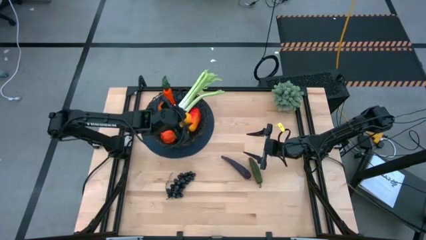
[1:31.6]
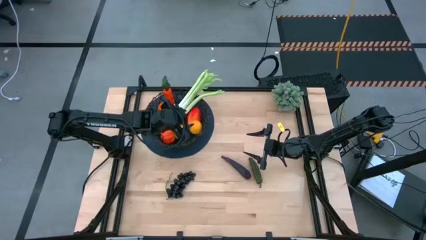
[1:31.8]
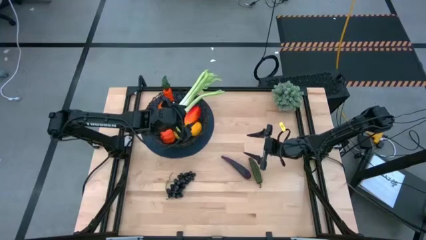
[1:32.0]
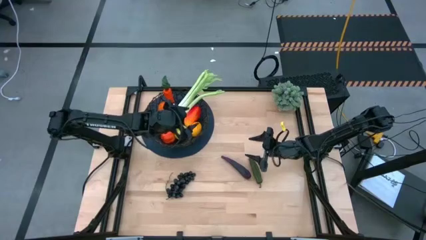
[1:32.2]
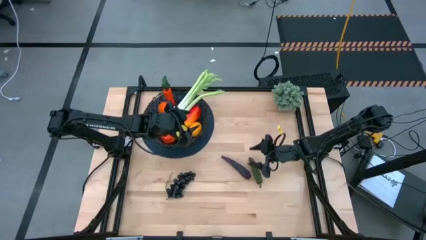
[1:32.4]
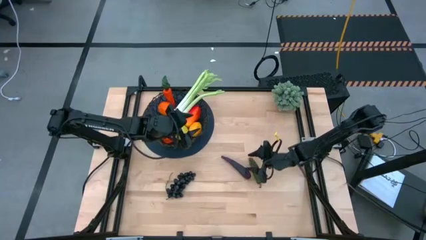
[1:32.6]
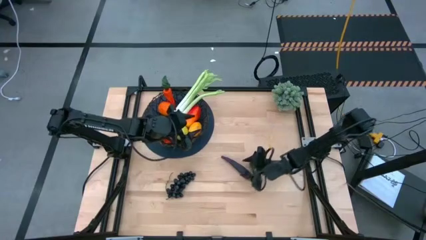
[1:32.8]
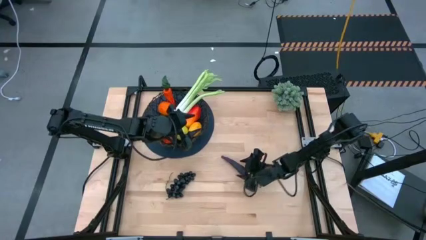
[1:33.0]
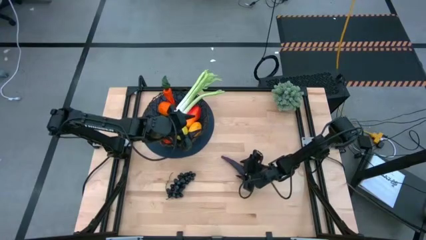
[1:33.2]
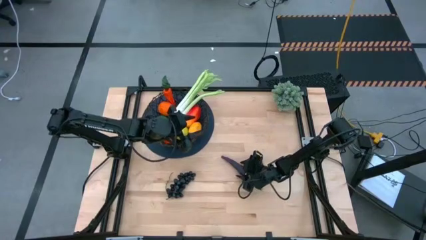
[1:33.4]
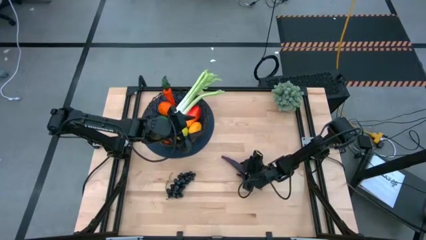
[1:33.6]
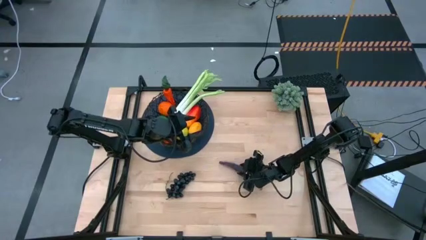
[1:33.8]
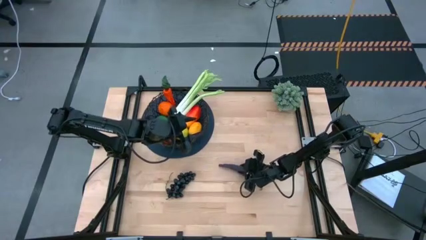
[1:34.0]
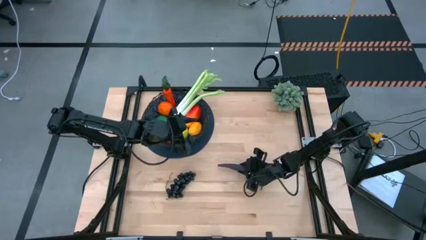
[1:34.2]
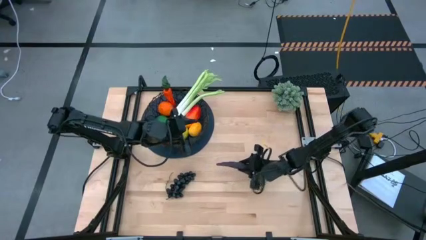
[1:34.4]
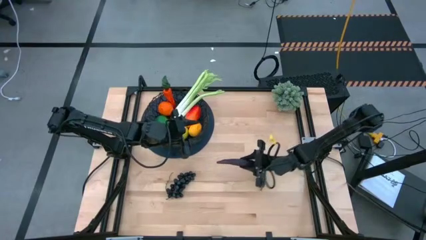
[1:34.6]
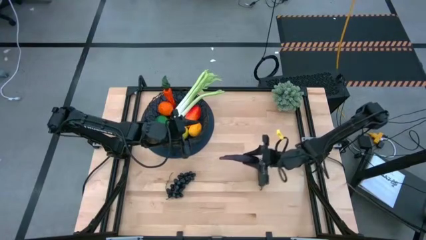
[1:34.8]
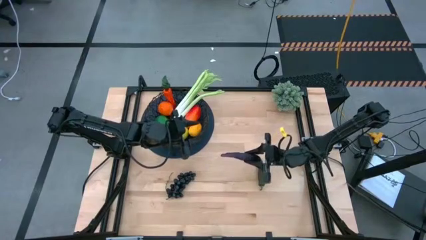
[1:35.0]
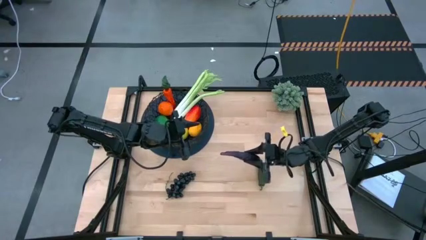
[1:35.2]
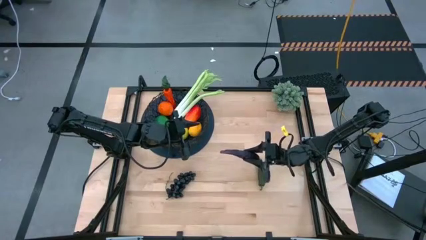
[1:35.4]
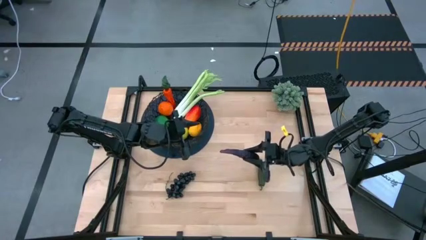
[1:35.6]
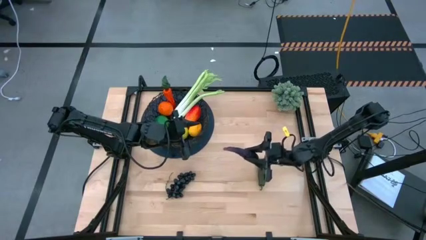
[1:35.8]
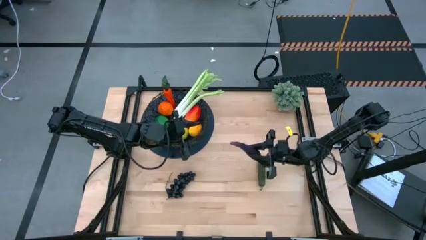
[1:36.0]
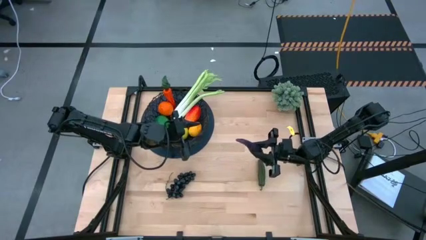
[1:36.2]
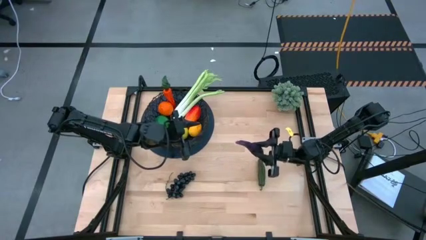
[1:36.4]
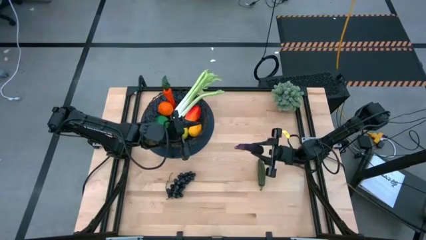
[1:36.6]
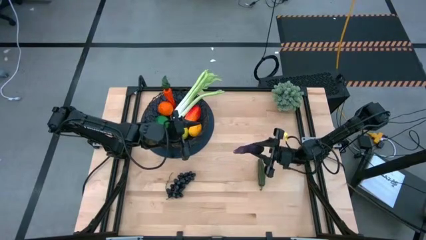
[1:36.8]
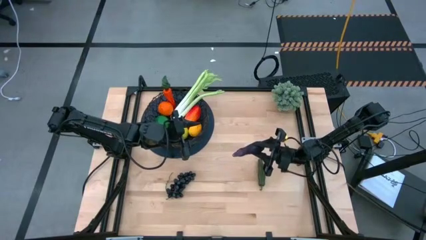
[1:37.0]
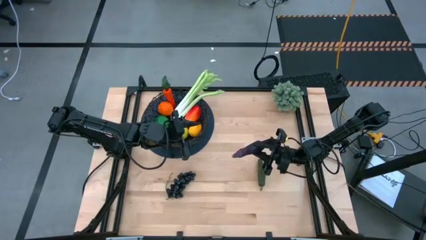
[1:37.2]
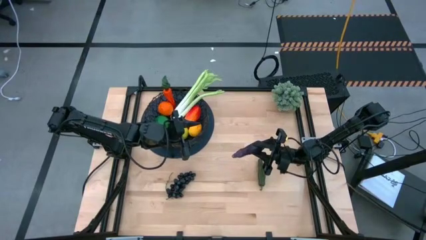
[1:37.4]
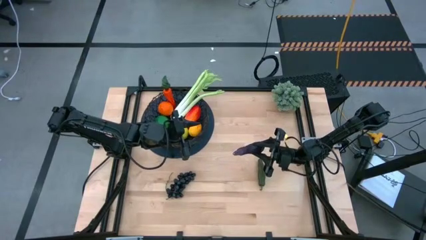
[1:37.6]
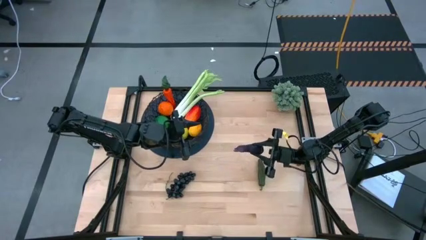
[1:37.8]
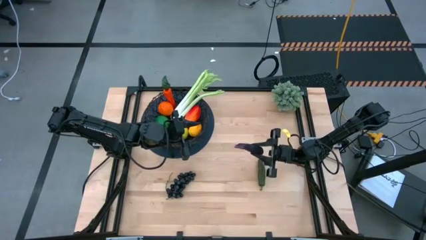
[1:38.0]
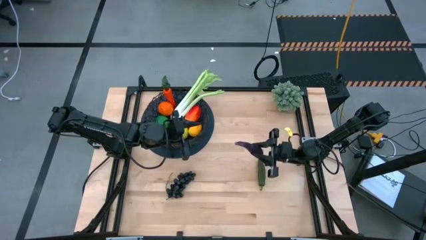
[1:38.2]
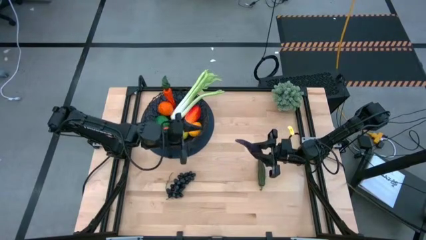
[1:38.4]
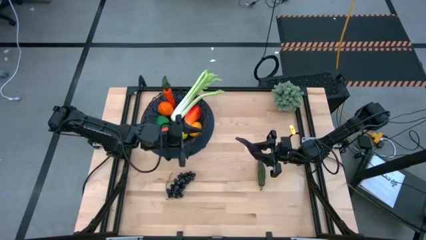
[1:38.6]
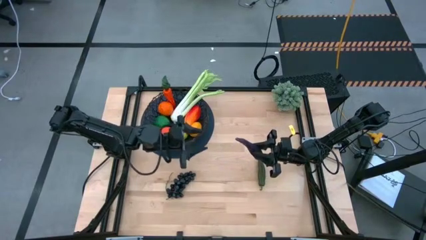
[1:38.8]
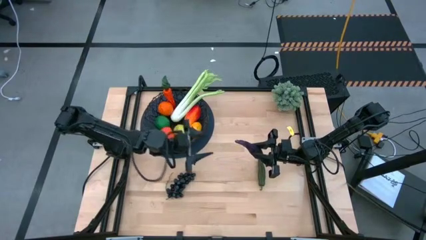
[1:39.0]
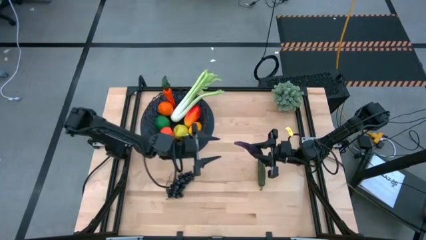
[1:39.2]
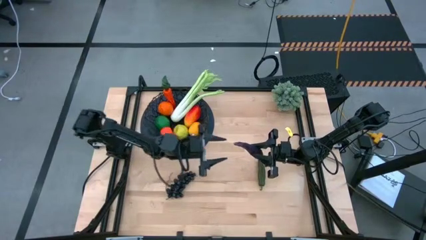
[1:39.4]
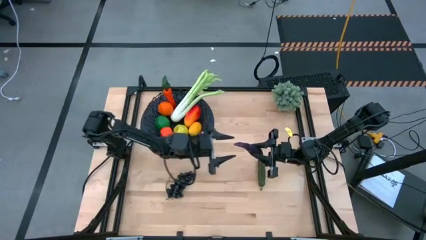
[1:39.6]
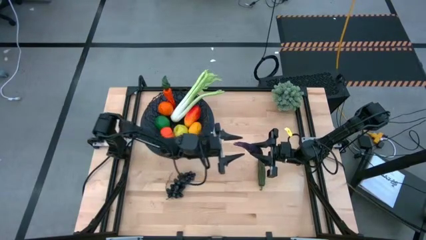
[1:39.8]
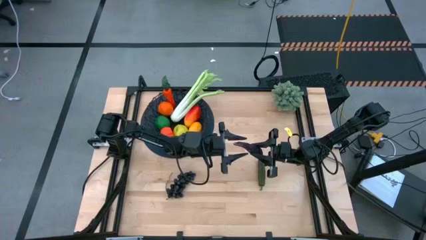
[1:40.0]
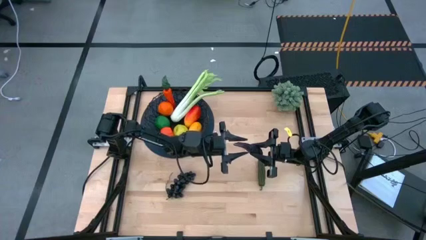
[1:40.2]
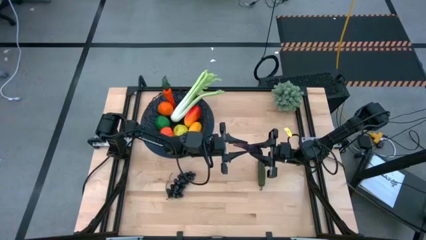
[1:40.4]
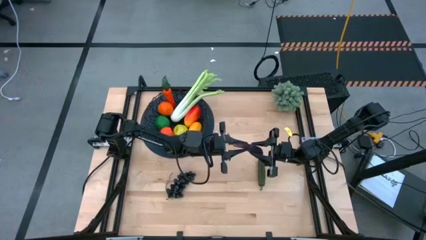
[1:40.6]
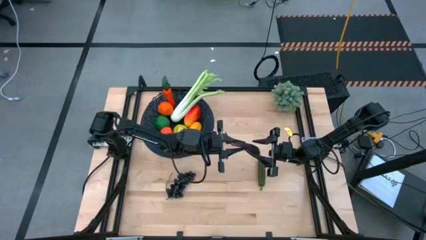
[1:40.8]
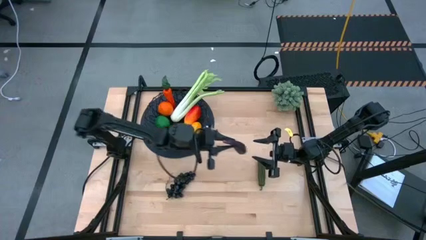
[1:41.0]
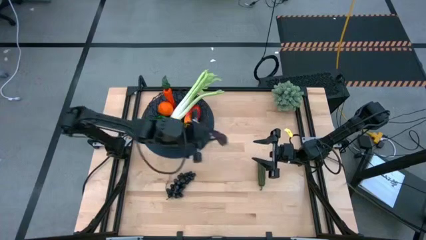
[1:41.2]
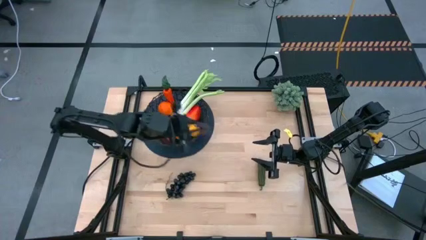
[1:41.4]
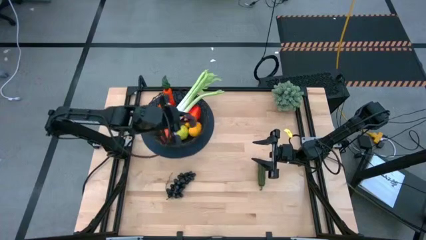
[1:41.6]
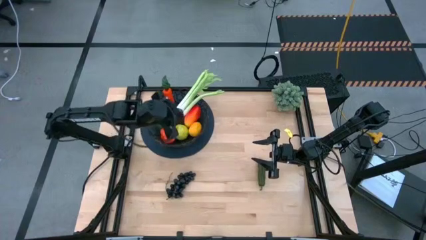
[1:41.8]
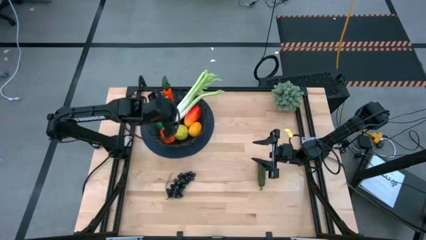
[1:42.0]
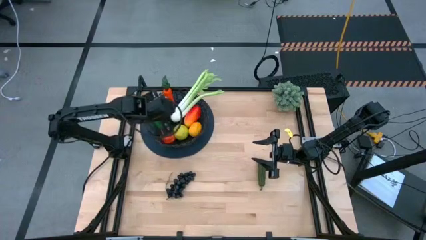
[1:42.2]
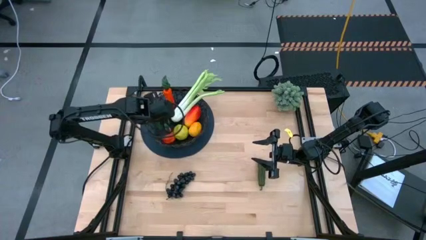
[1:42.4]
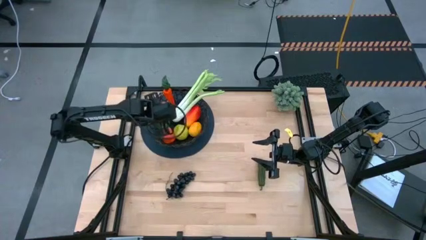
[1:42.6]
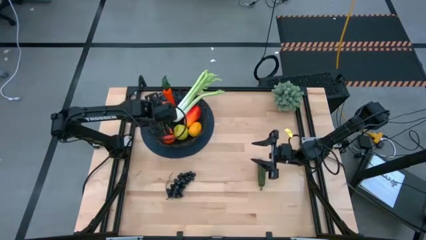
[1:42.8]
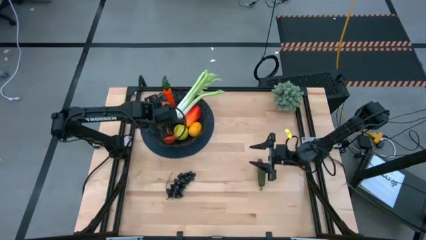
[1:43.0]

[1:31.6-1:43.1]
Task: Build produce basket
Put the violet eggplant into the black basket

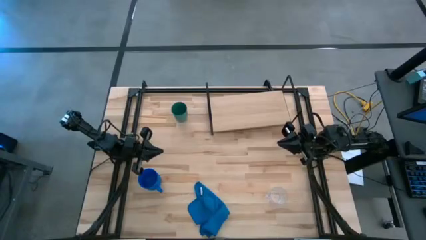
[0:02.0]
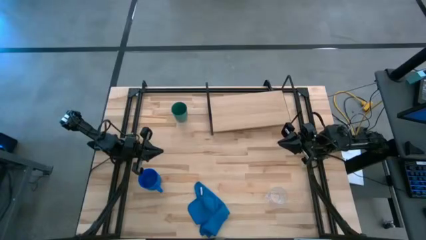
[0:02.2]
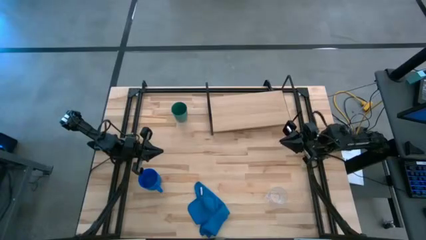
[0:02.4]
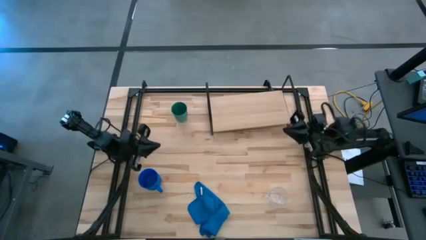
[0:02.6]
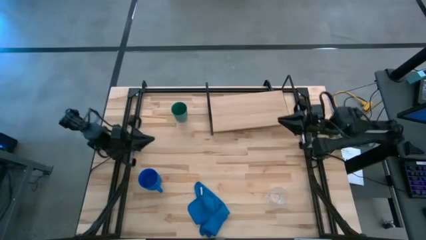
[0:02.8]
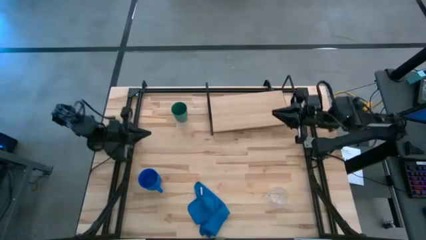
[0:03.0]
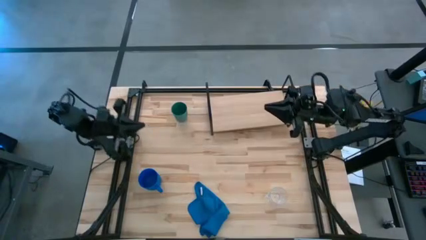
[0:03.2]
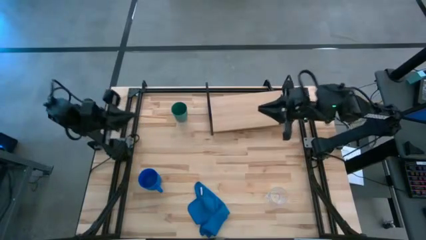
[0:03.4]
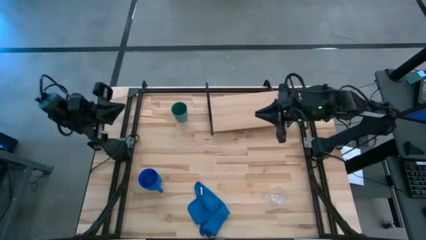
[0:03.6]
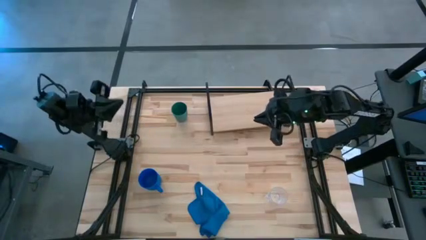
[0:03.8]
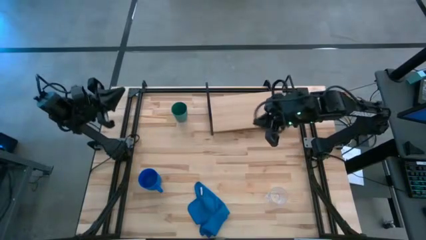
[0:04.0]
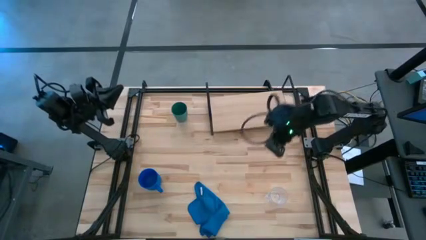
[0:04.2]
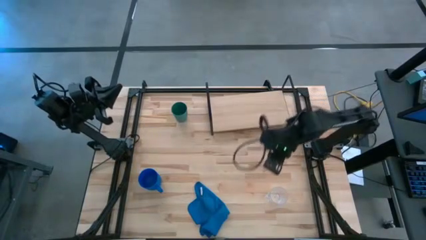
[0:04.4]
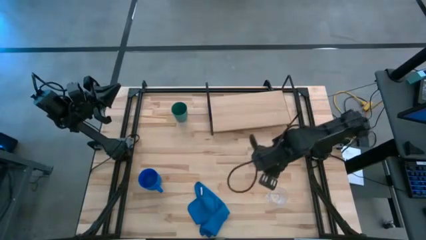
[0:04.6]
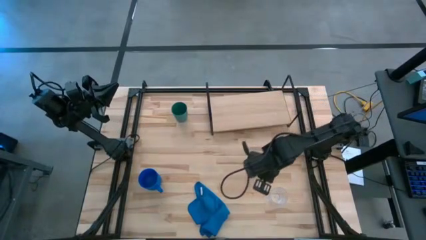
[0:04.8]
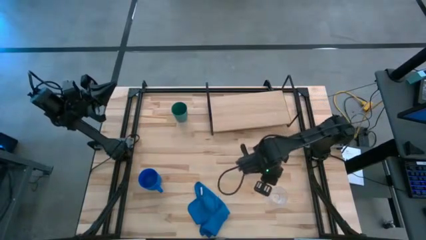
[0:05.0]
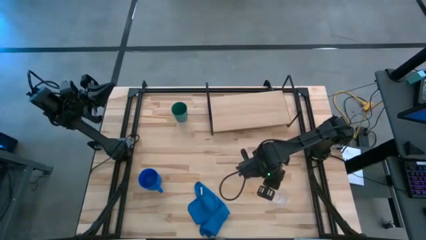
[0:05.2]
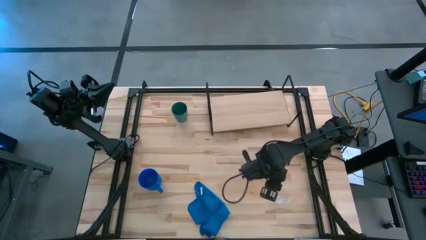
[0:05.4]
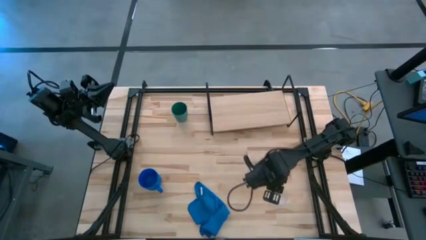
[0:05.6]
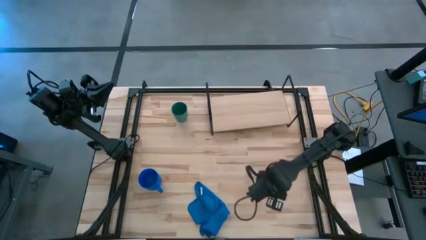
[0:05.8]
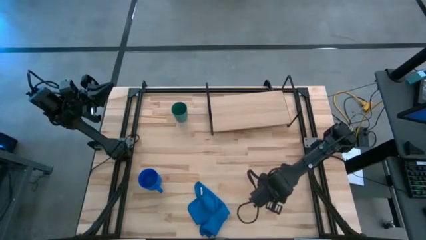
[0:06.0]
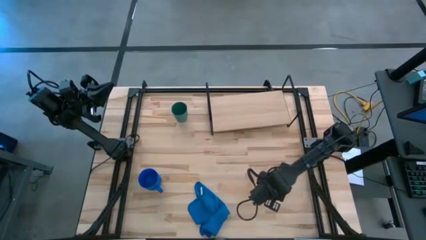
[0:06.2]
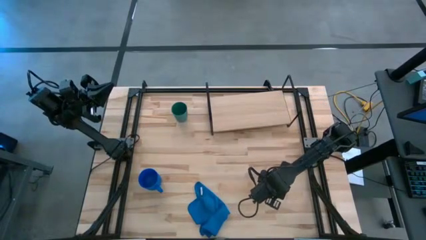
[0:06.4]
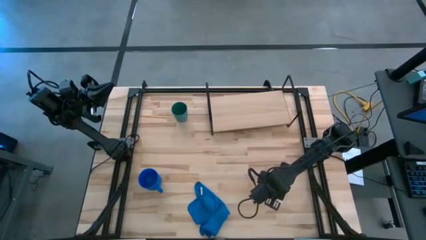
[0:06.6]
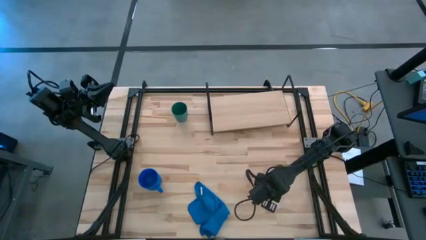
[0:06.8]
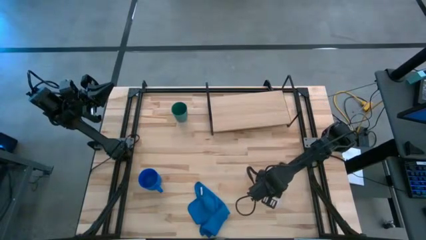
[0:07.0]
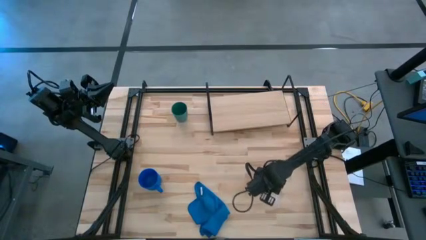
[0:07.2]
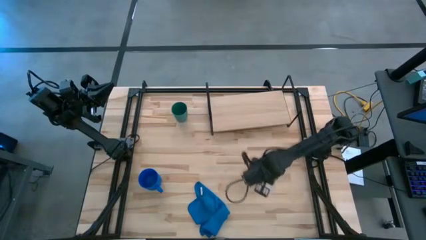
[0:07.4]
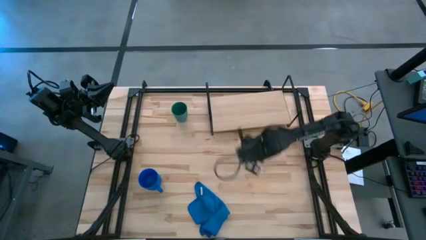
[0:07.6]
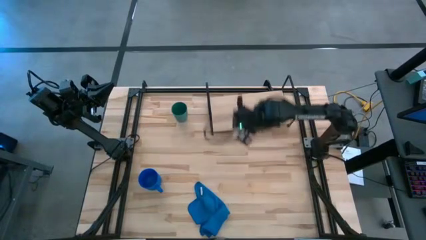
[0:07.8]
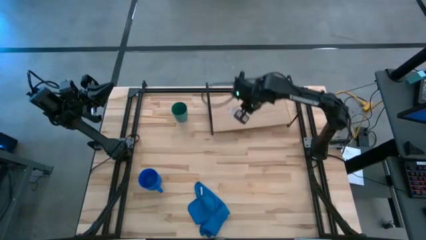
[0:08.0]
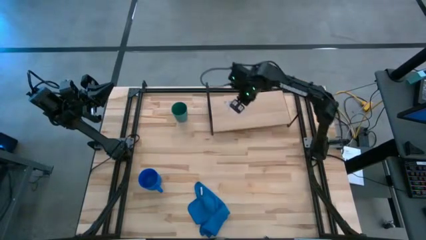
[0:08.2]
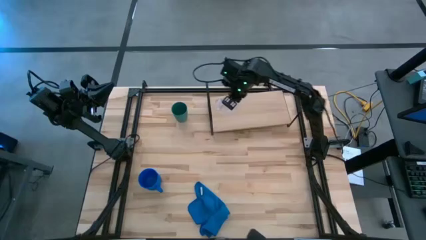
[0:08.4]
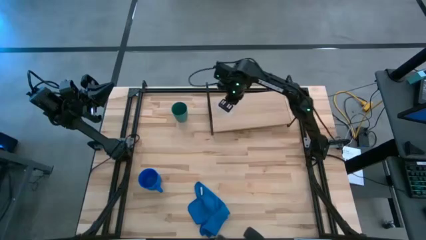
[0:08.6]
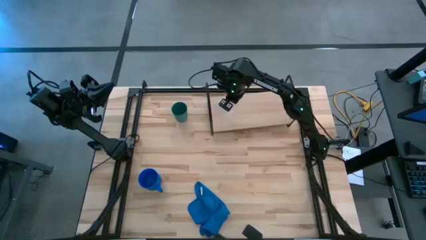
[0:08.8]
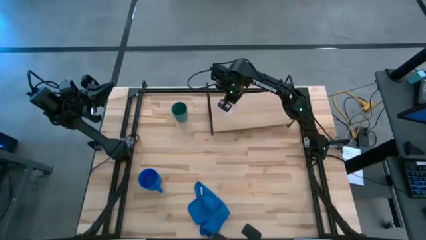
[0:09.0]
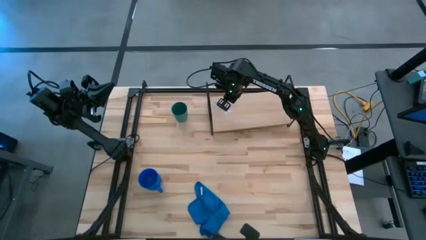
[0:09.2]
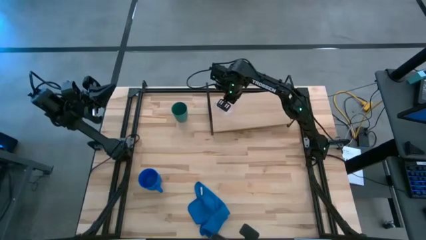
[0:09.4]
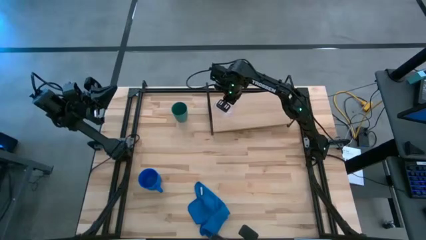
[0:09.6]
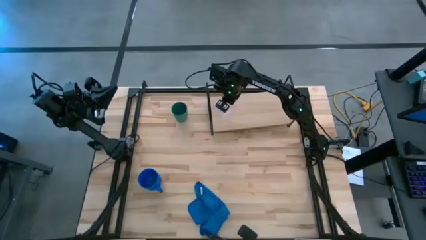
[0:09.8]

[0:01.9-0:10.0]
Task: Stack small to large cups/mugs on shelf
Put the transparent mug on the shelf
